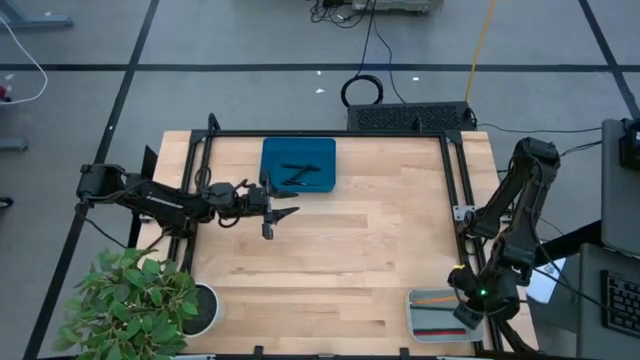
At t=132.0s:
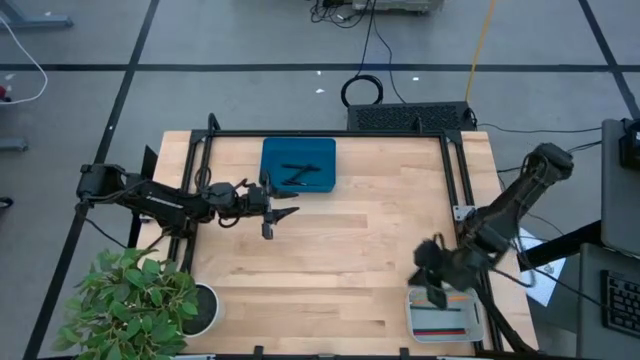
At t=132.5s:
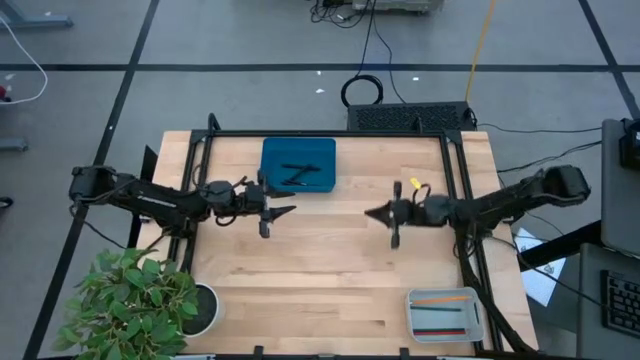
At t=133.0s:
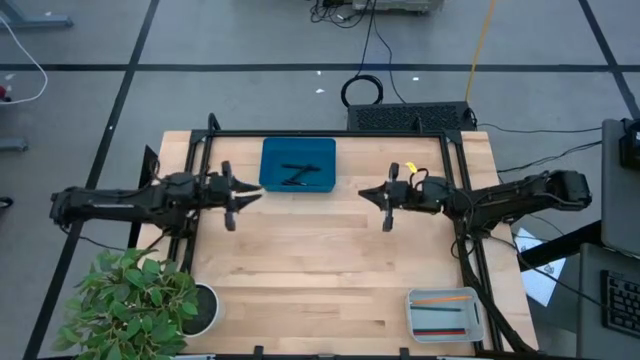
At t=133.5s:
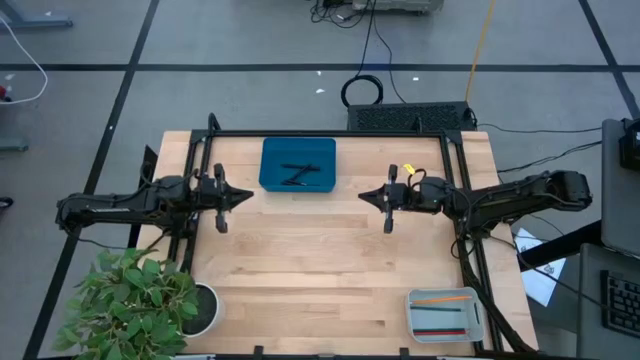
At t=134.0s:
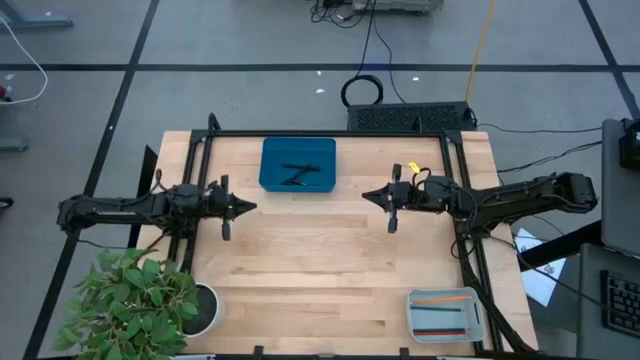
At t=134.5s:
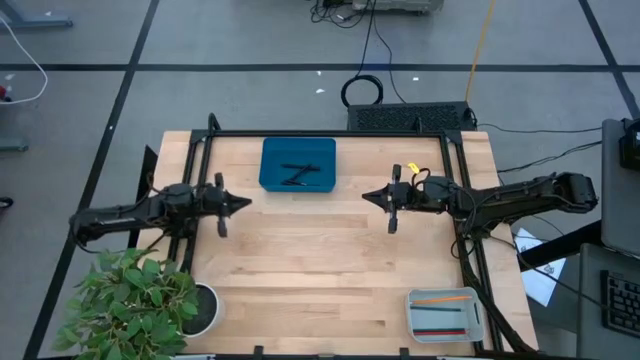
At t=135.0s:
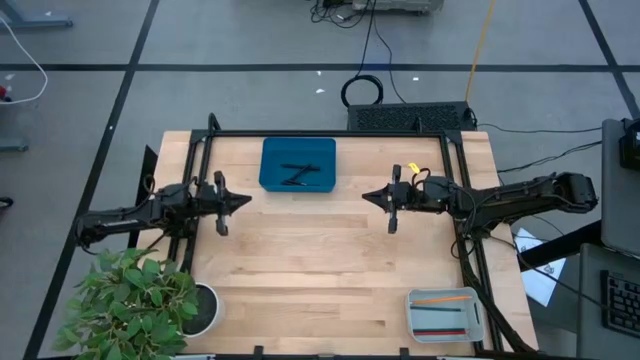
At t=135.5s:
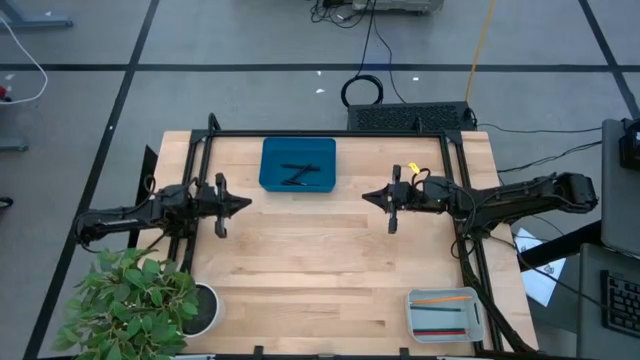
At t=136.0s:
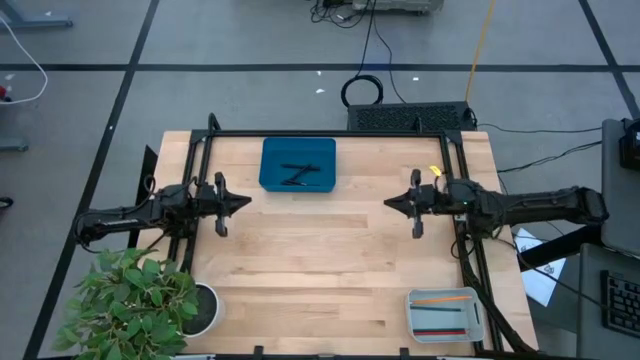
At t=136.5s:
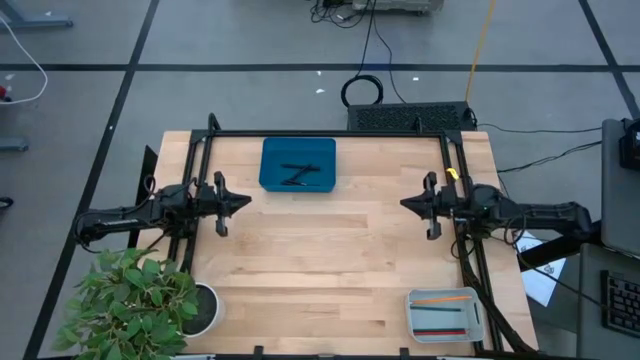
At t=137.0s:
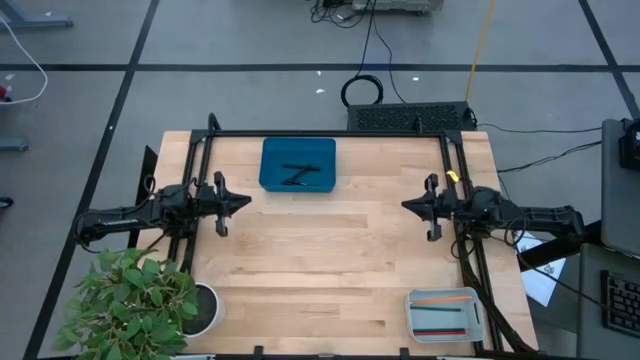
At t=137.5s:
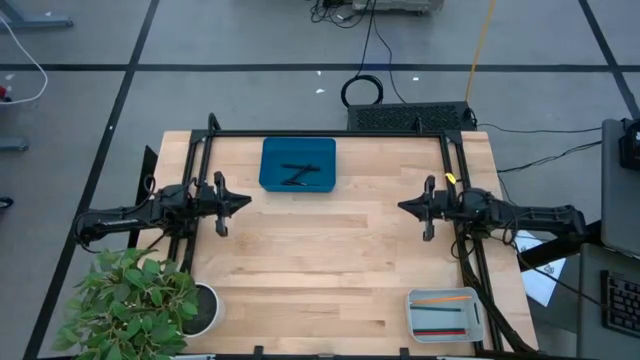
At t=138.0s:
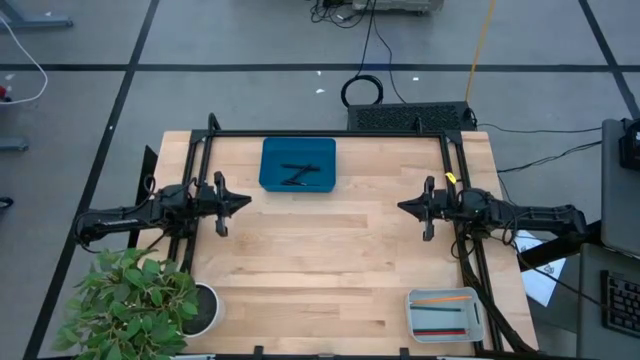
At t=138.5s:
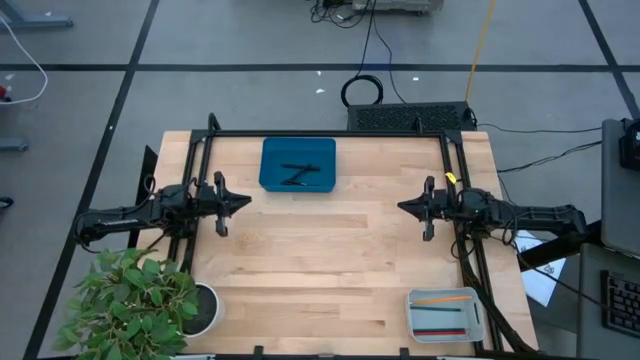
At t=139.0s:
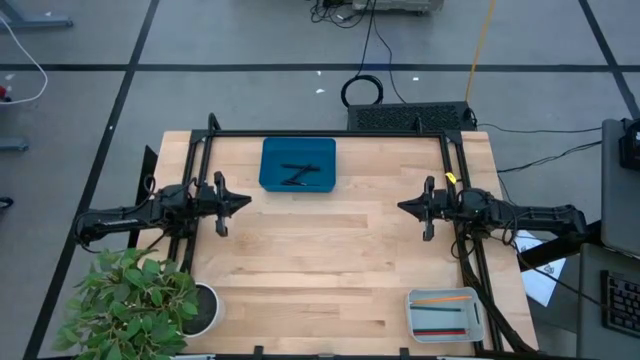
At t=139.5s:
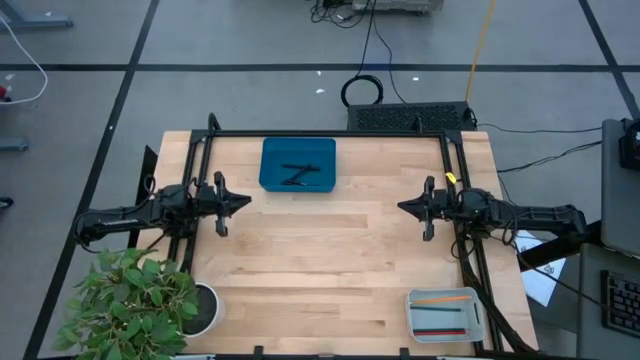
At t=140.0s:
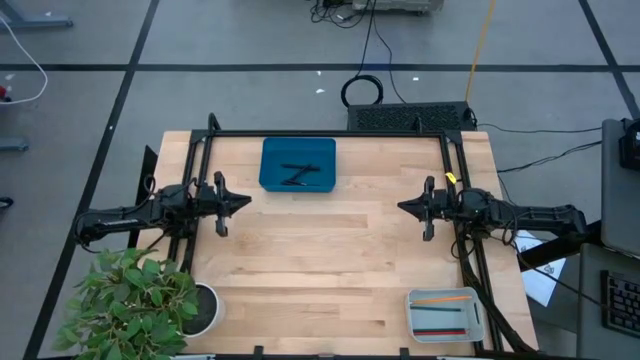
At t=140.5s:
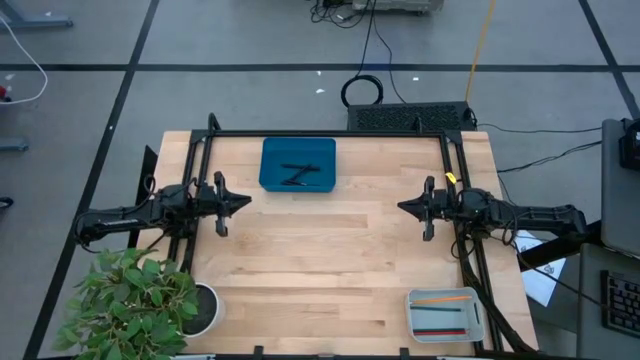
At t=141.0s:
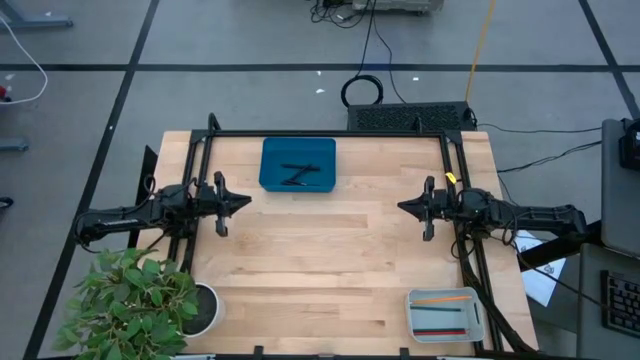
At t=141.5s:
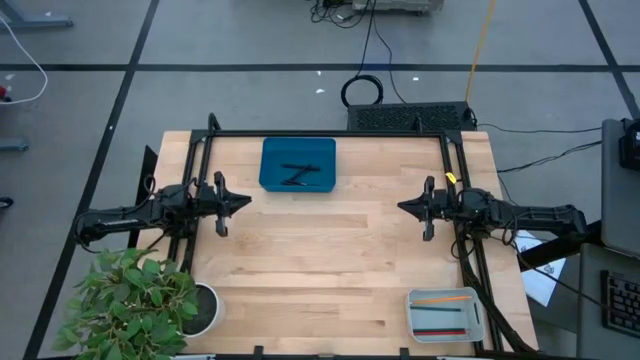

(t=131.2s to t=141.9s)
Task: Sort pens & pencils
Return to Home Position

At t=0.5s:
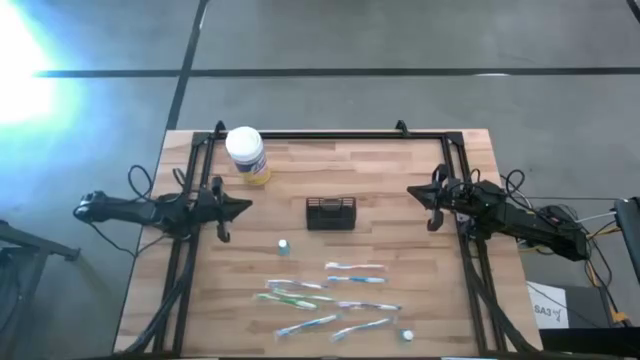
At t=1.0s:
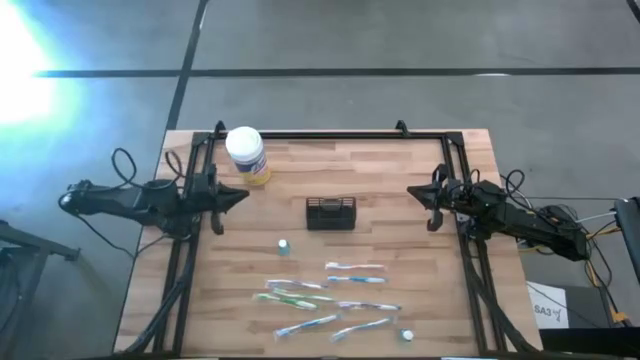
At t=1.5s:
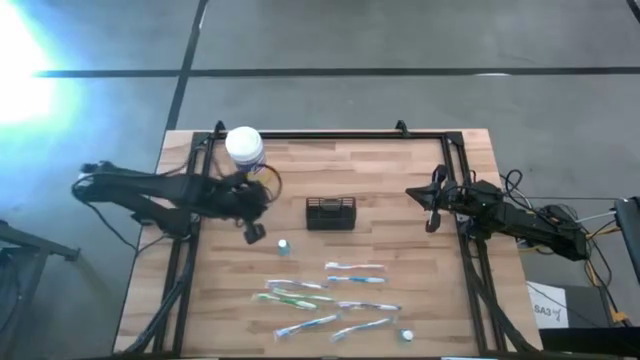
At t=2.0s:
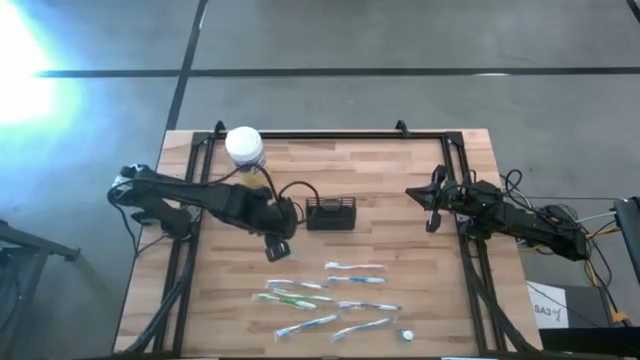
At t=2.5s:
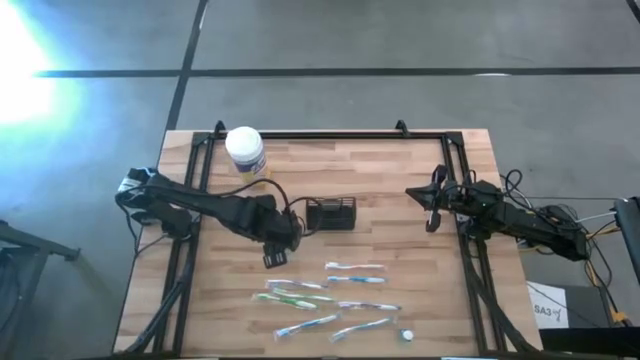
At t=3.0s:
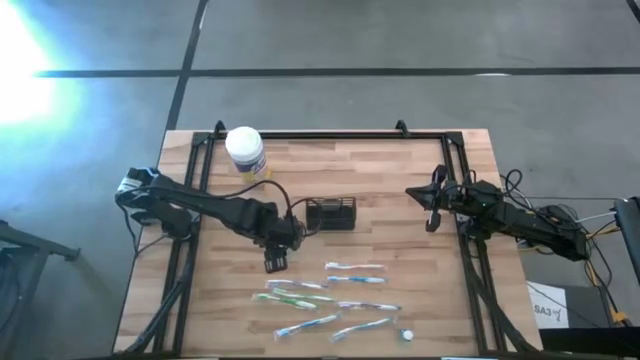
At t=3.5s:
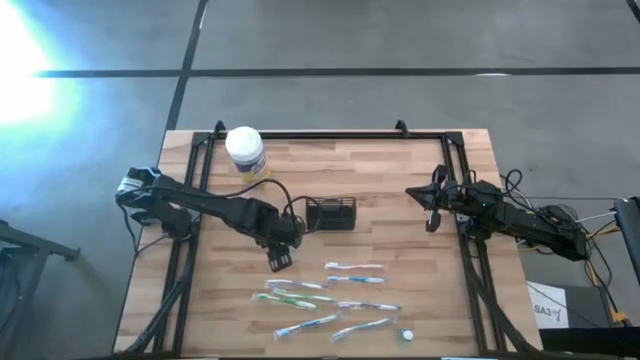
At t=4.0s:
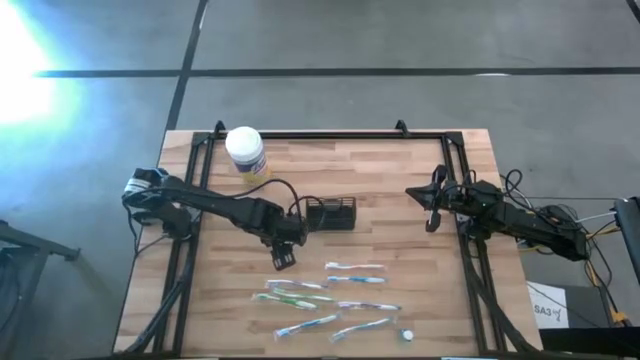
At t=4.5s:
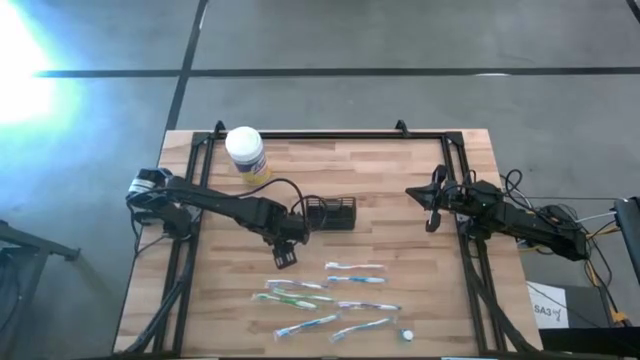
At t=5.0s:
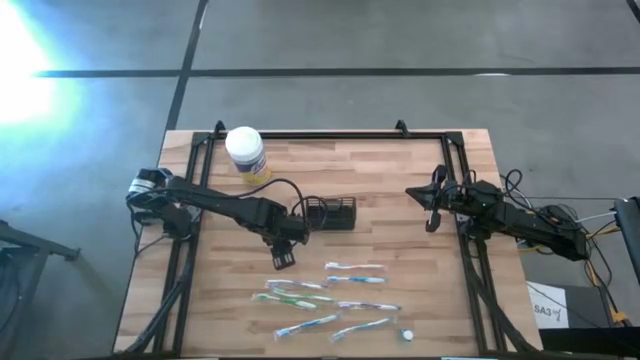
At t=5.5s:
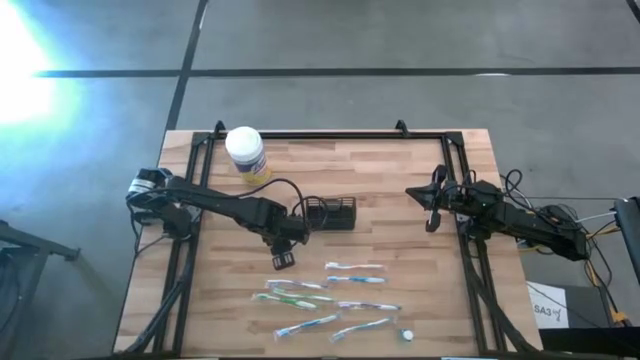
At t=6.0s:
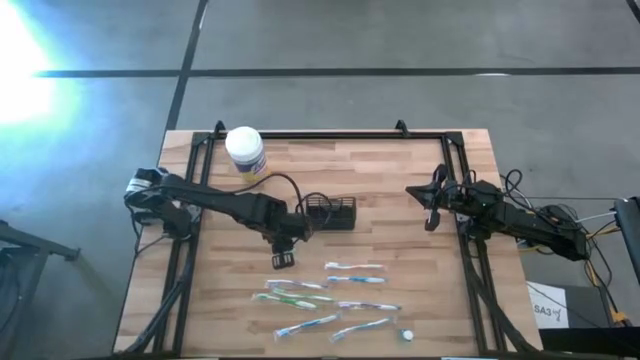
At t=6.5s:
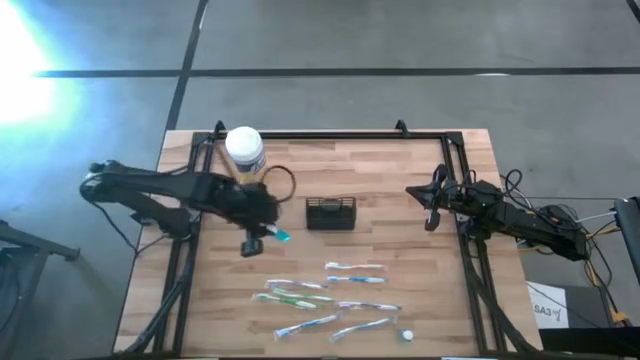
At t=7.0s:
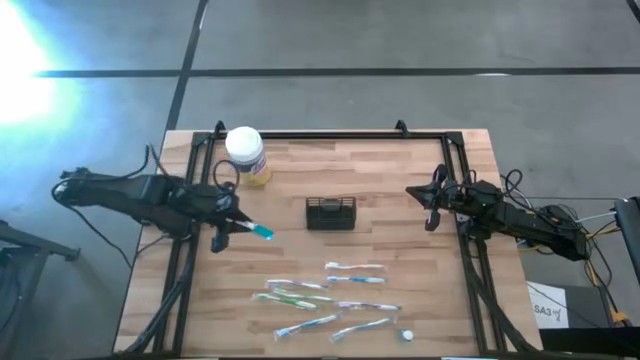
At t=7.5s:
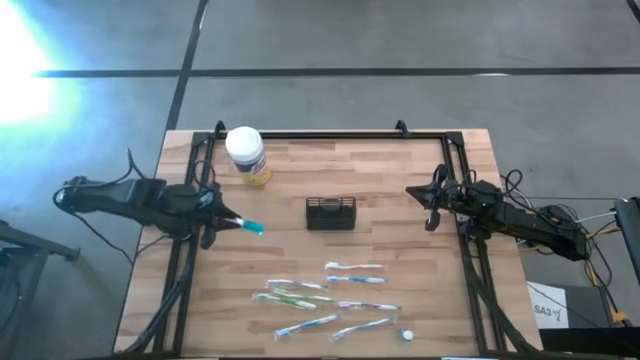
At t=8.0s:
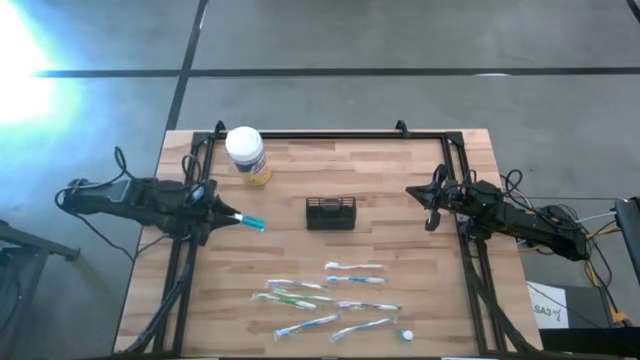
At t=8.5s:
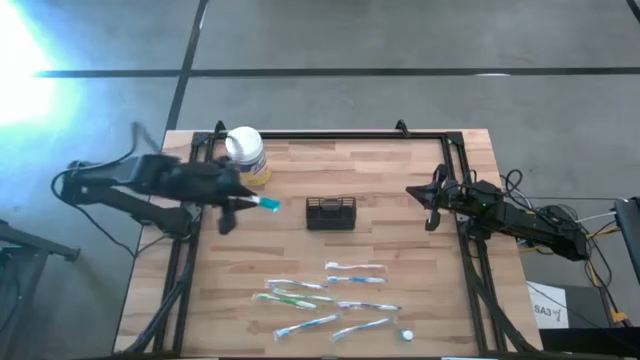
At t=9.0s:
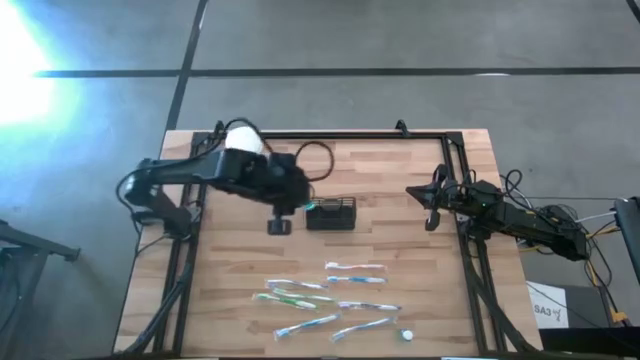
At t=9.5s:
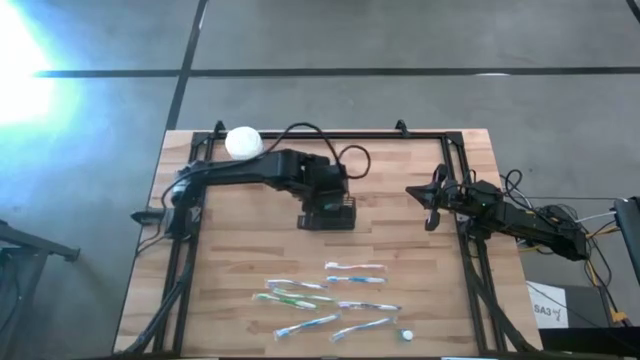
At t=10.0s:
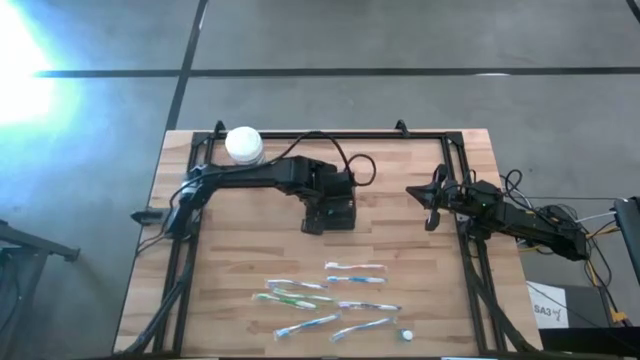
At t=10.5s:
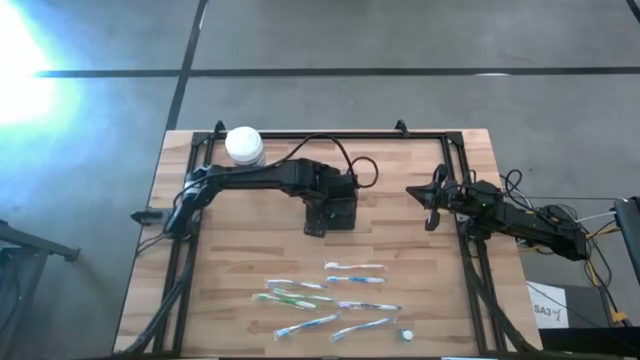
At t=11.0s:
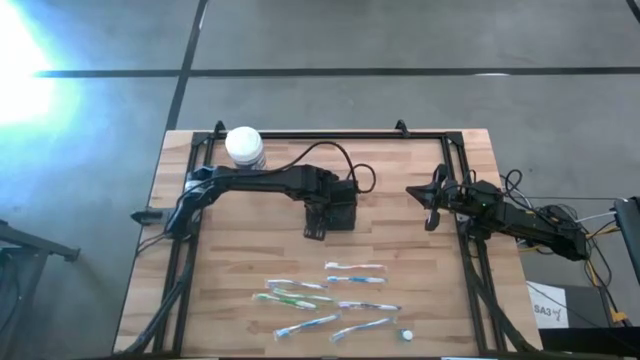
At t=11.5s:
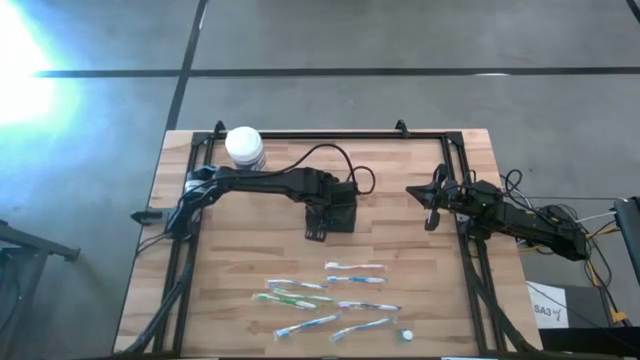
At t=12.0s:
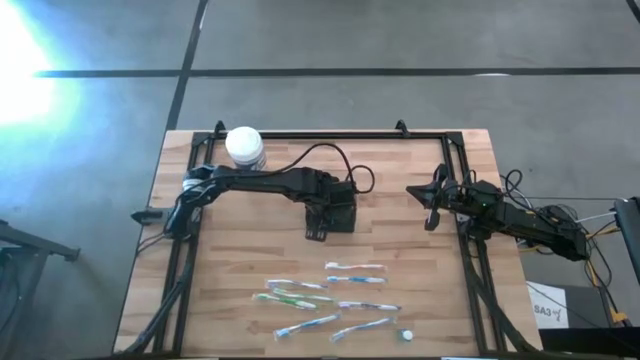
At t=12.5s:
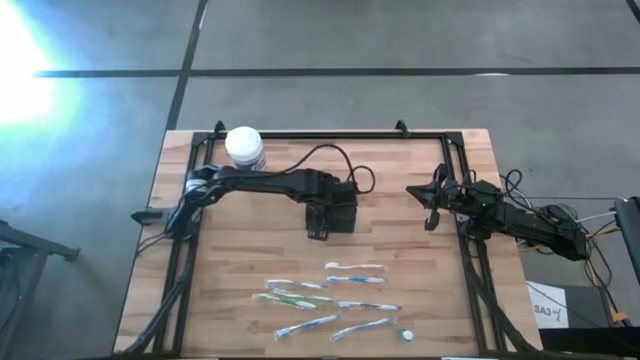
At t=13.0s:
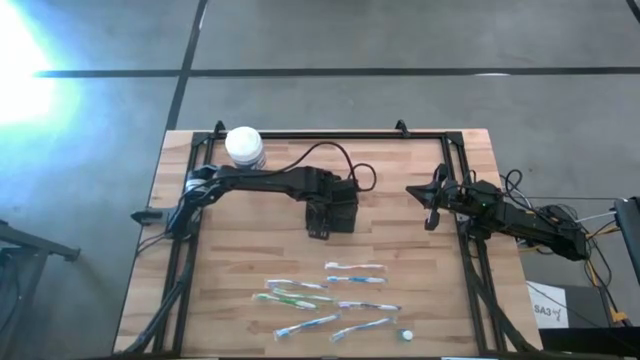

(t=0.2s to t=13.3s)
Task: Pick & Place toothbrushing station
Put the blue mouthwash into the black wire organizer
